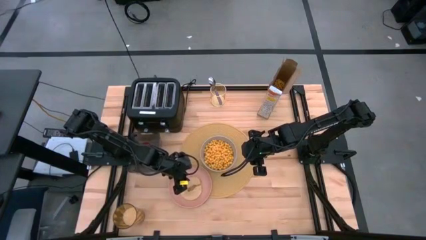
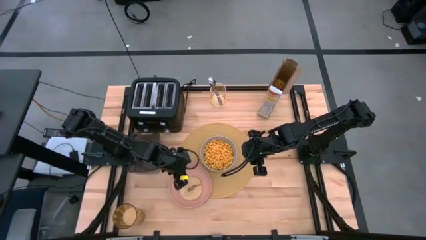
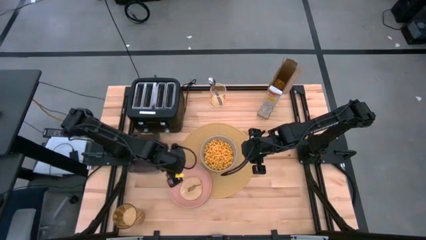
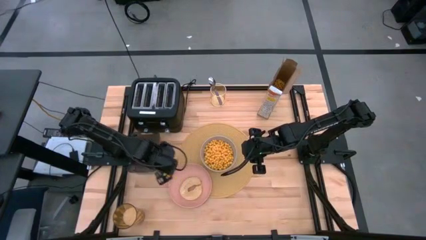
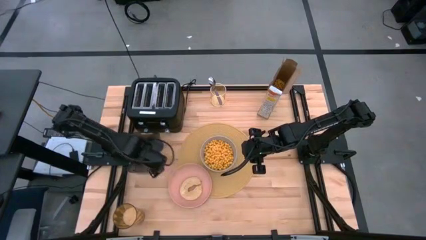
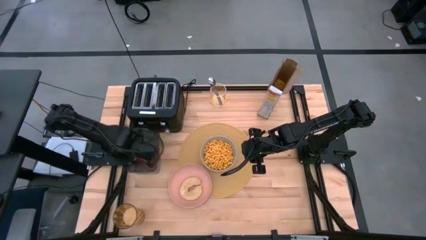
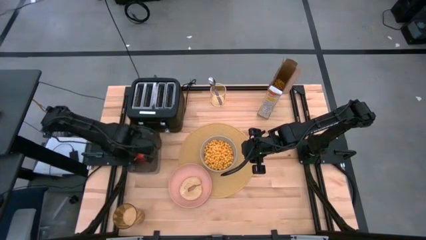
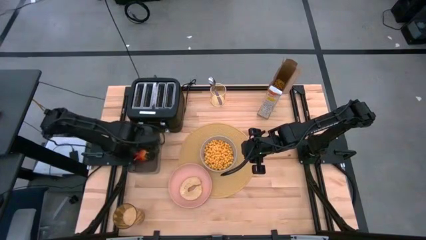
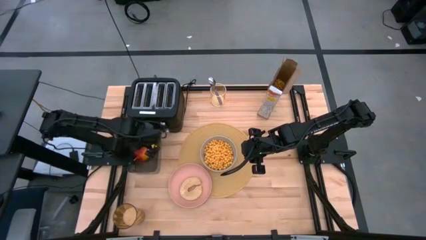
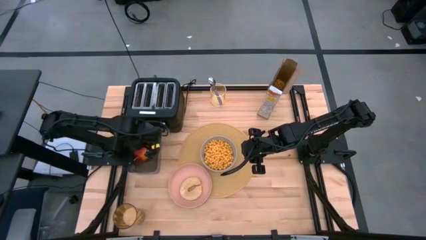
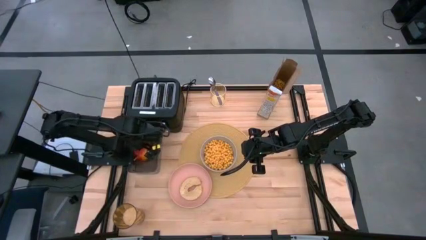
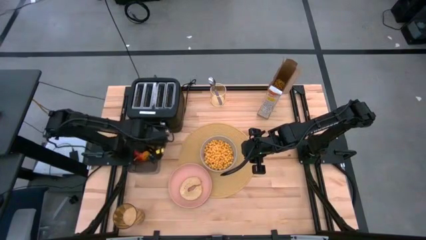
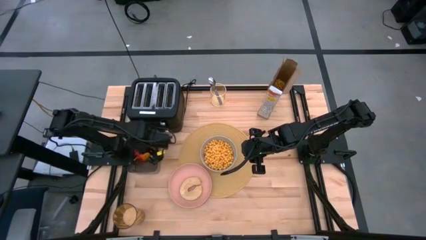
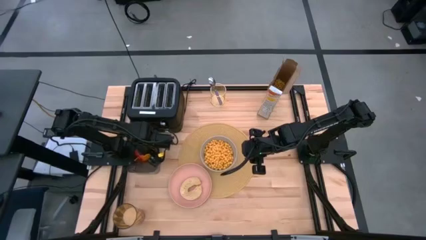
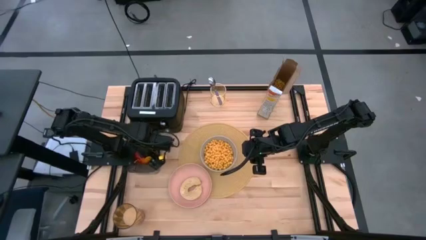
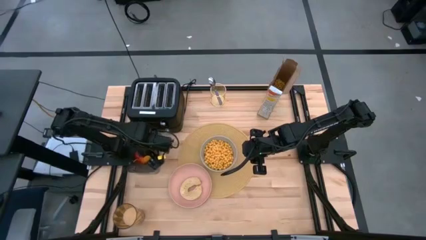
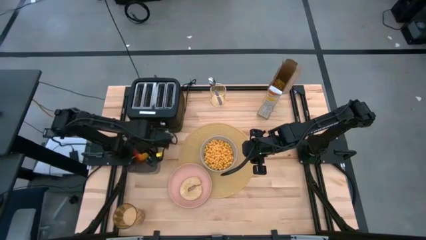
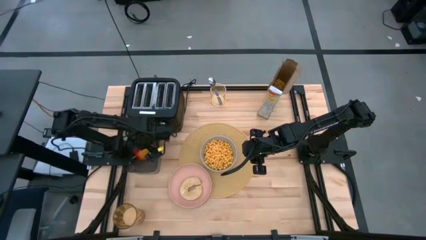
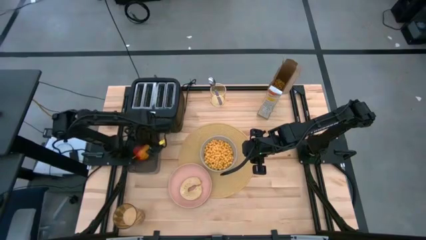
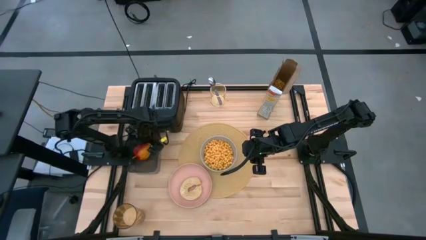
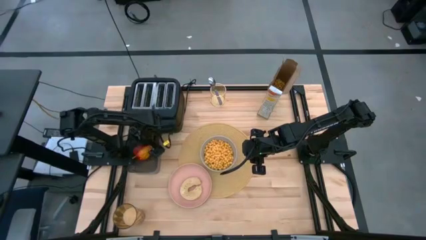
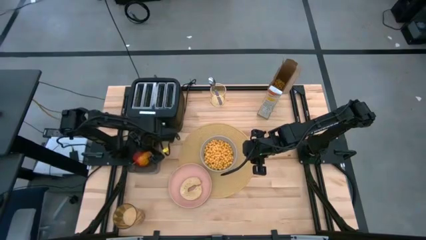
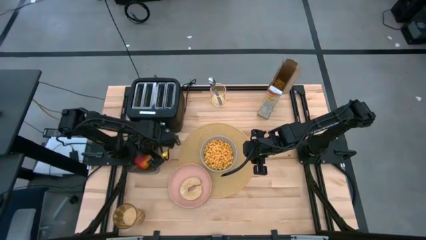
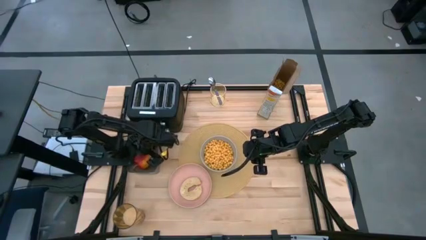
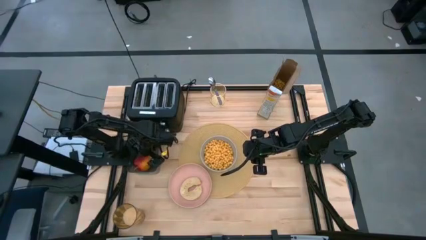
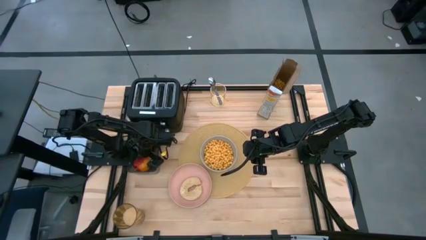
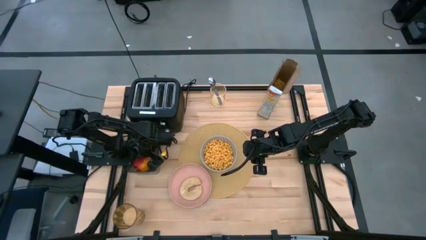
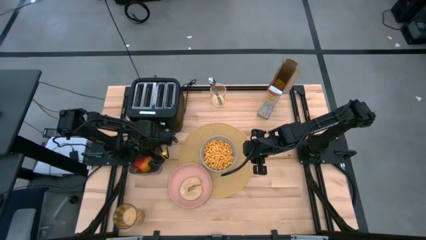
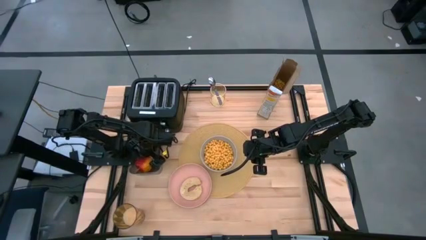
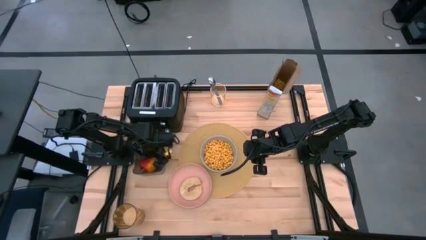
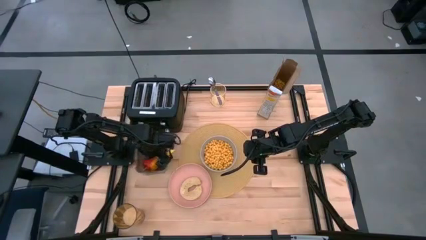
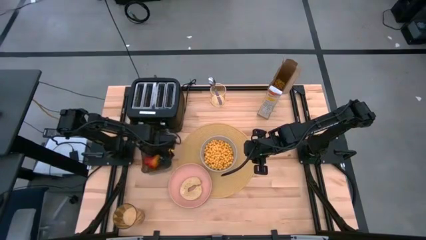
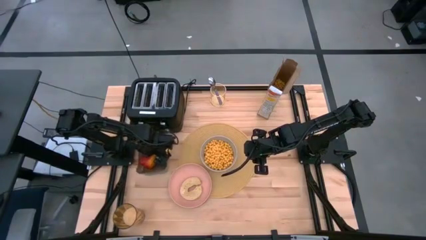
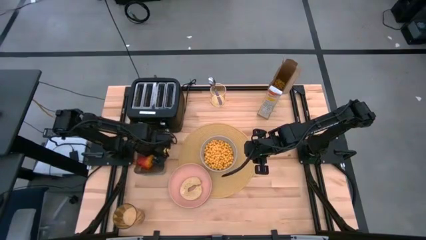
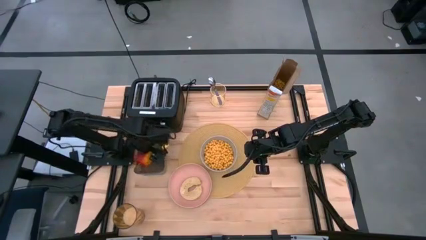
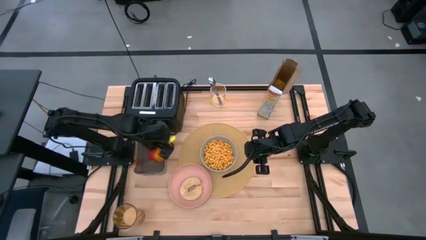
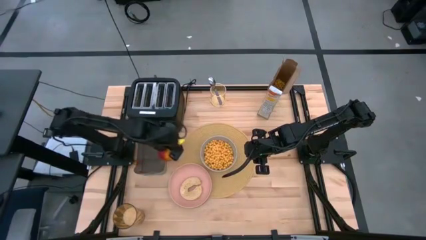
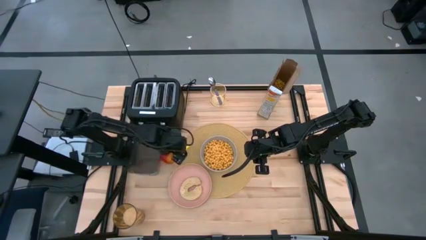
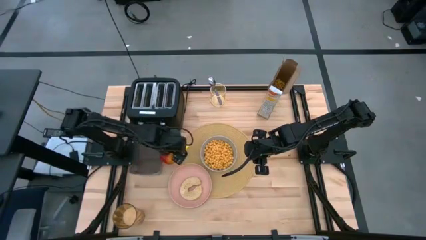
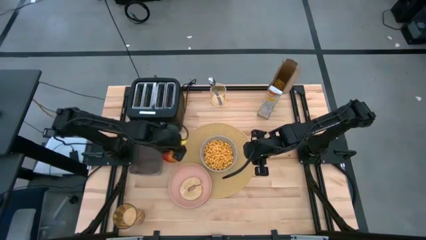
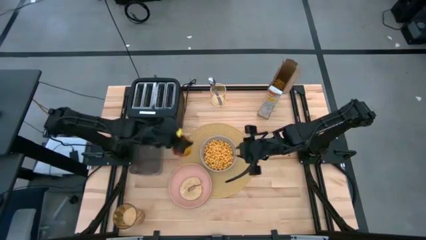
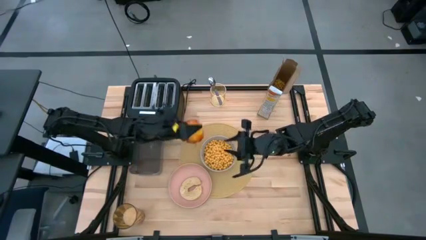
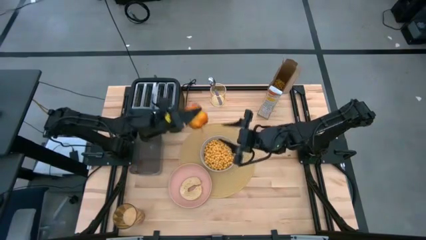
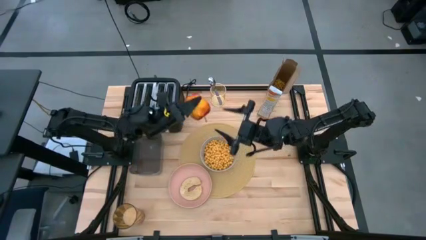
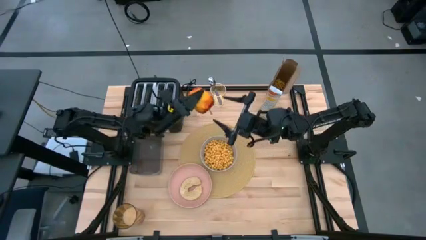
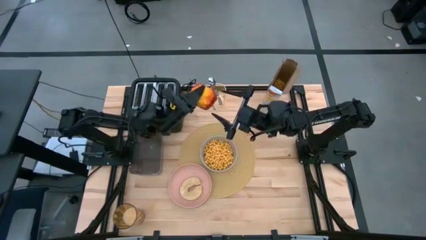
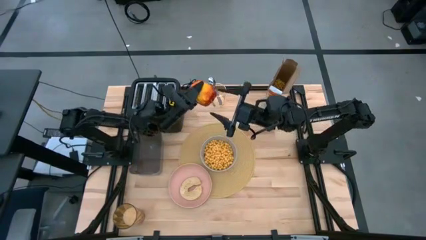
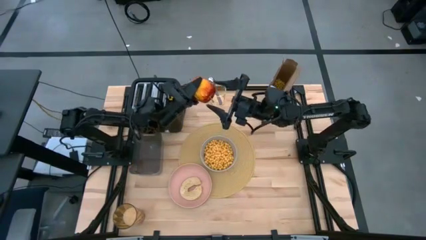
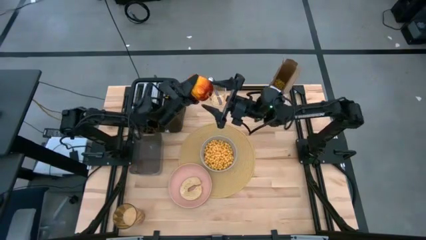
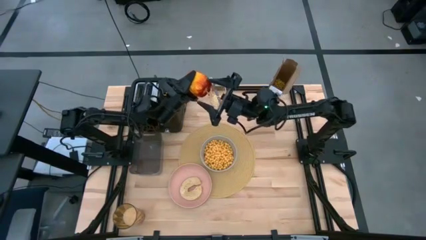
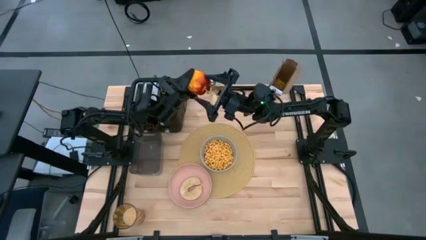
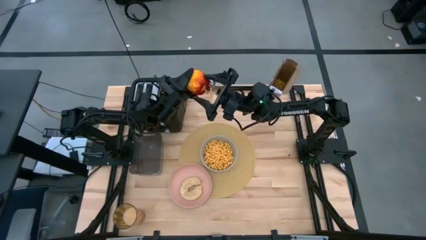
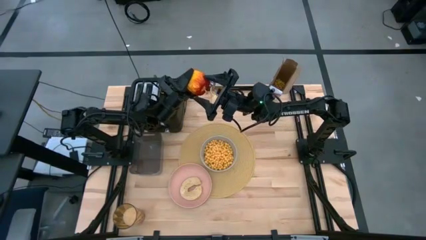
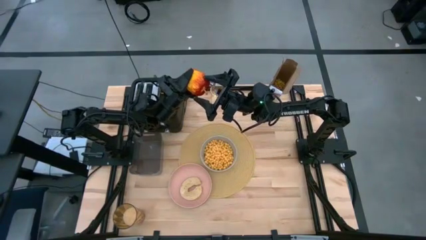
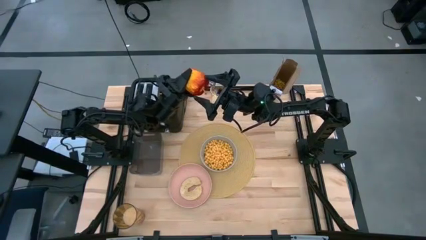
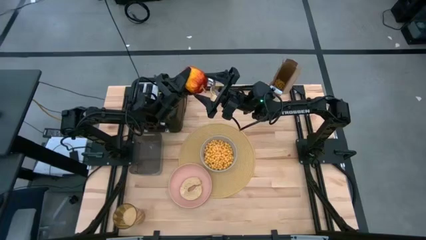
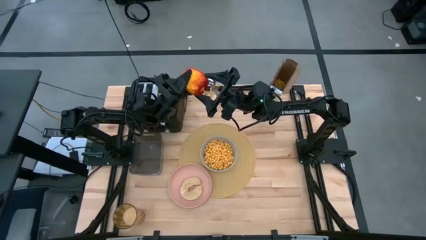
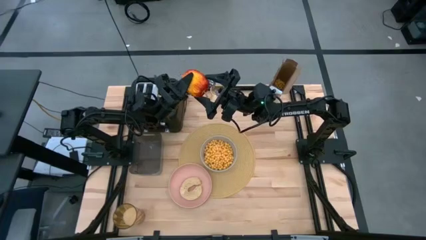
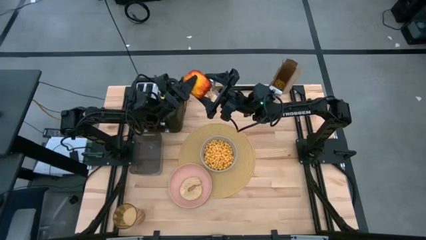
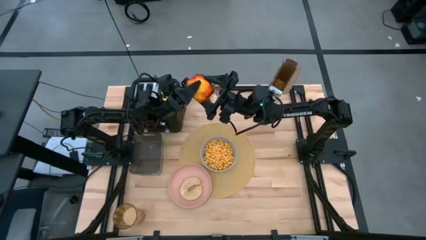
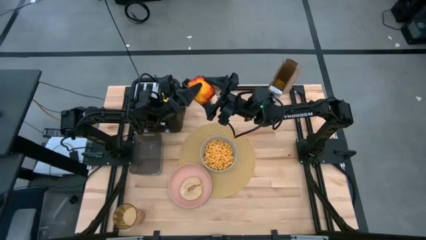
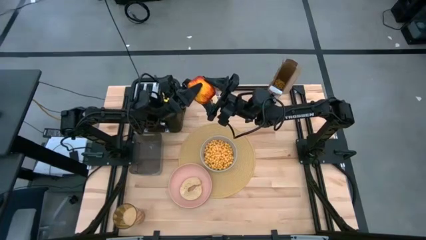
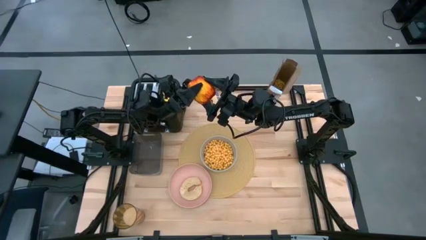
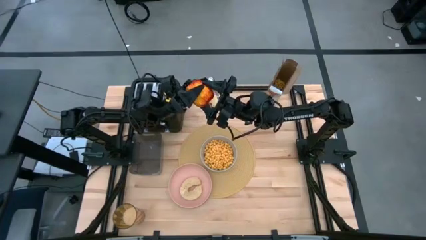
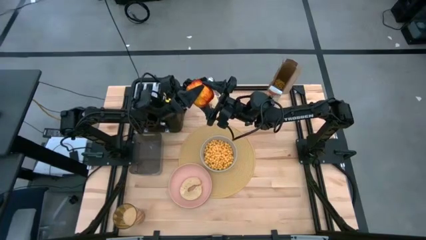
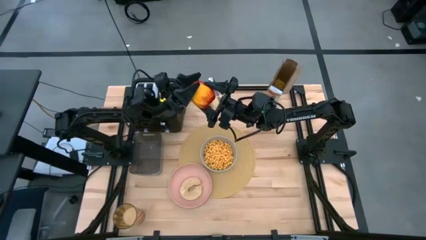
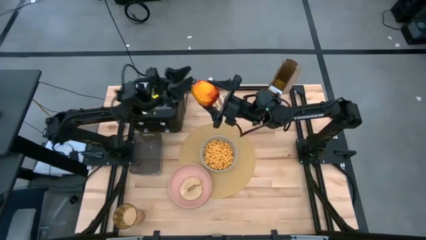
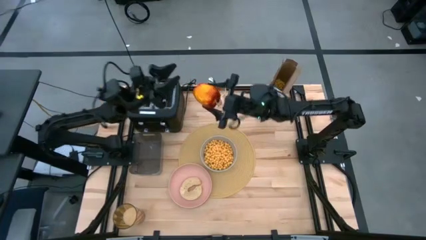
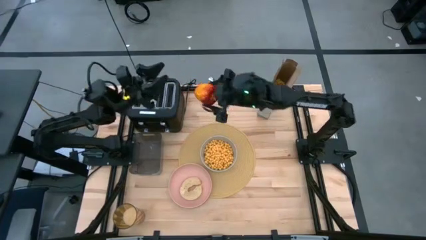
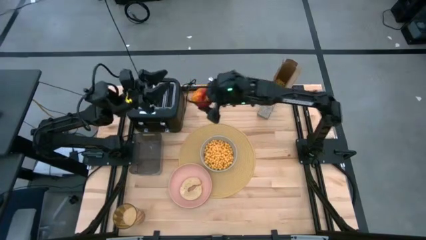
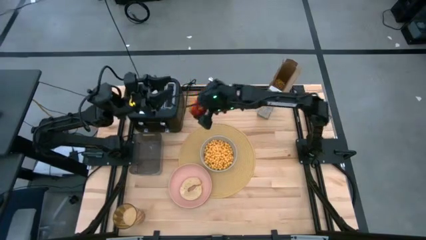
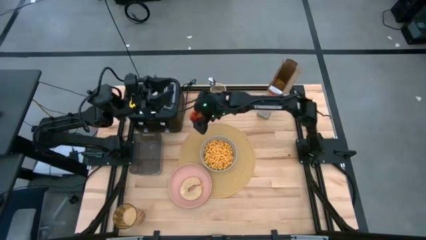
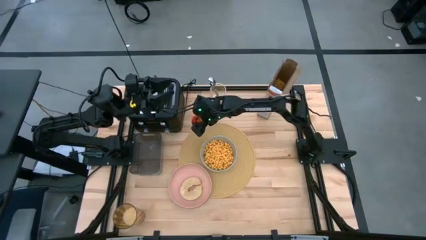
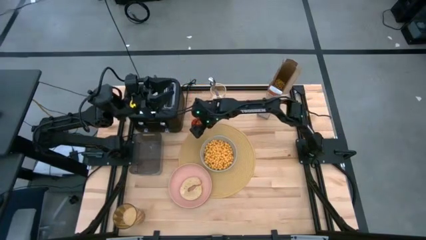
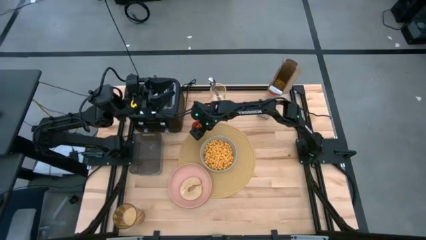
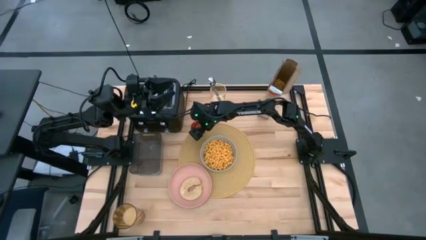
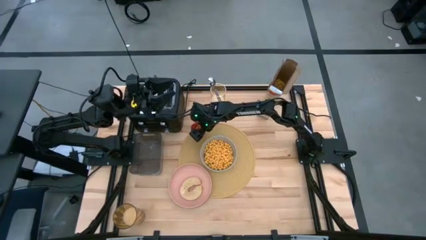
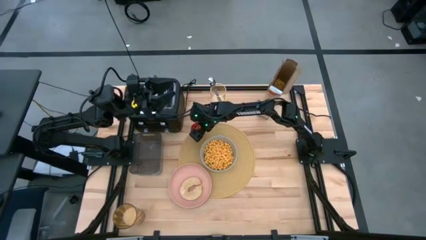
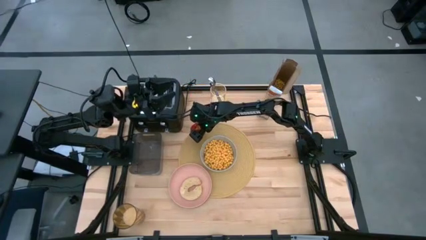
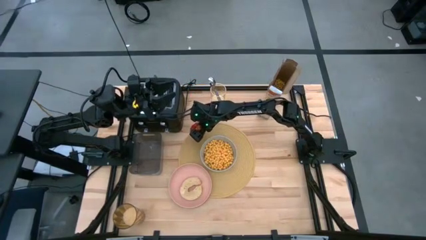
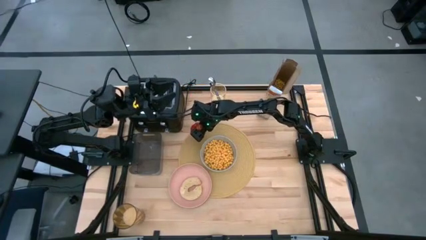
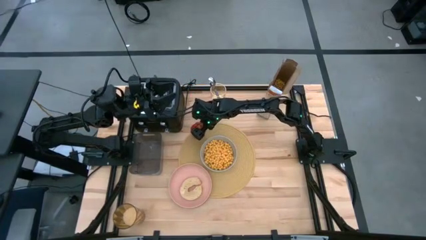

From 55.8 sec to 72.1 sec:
Task: Arrange a breakfast setting
Put the apple on the table mat to the top left of the gray bowl

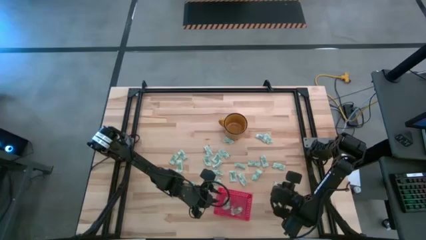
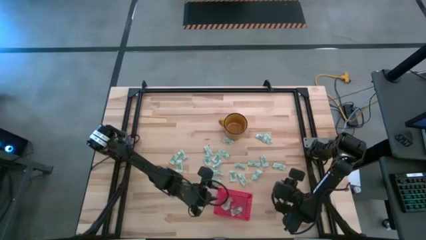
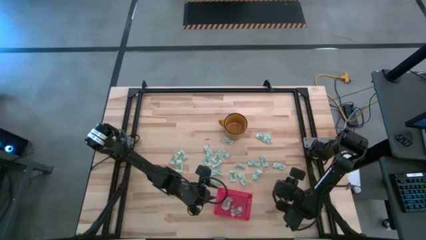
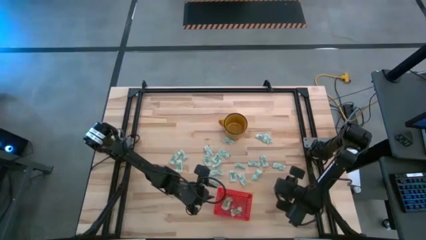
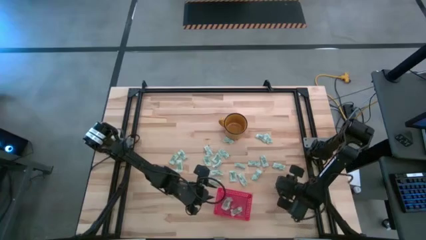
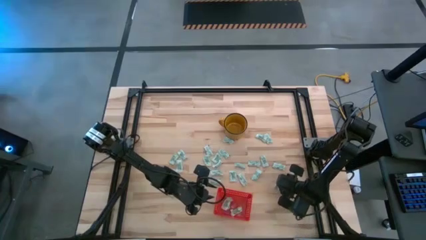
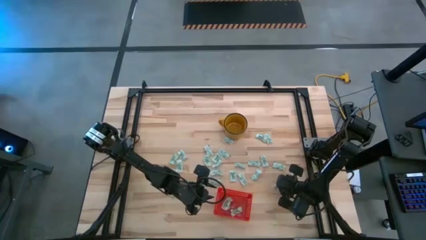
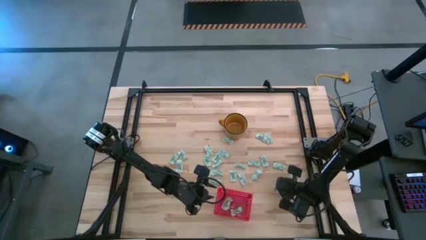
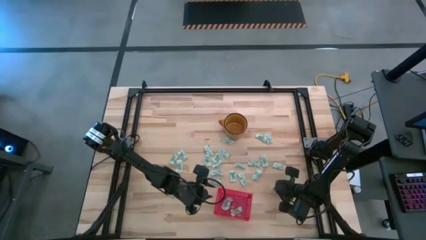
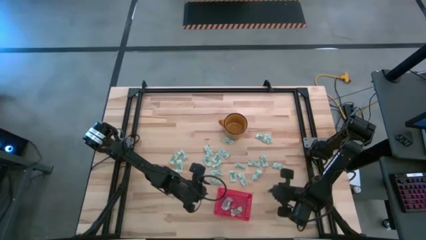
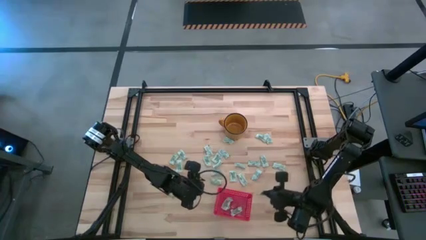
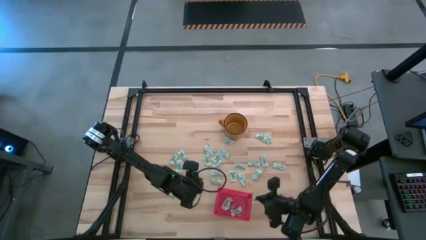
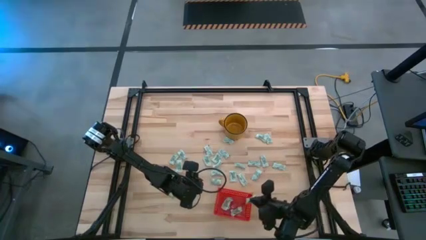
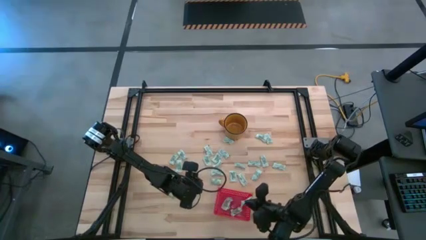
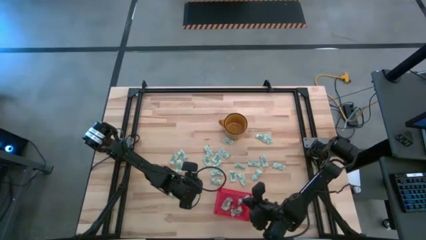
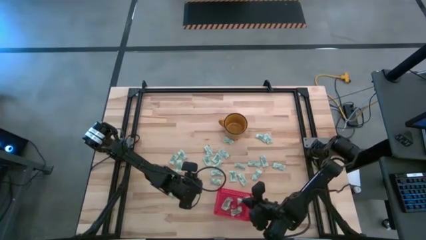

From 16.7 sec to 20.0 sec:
Task: Pick and place Stevia / Truvia into bins
Put the stevia packet into the bin
